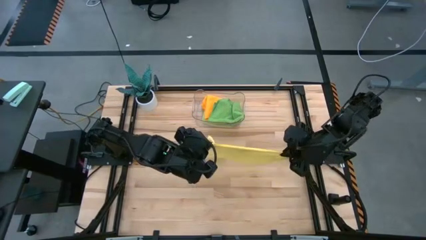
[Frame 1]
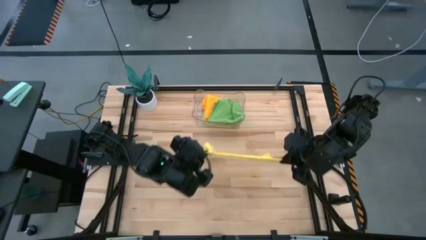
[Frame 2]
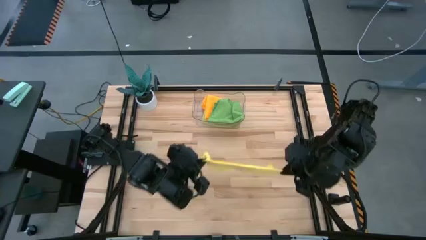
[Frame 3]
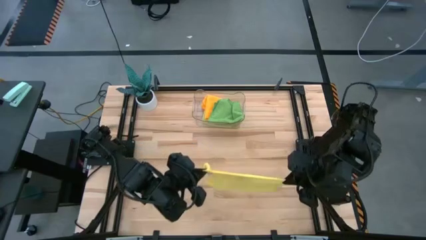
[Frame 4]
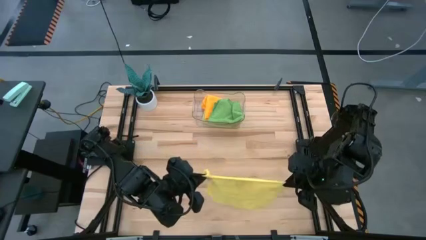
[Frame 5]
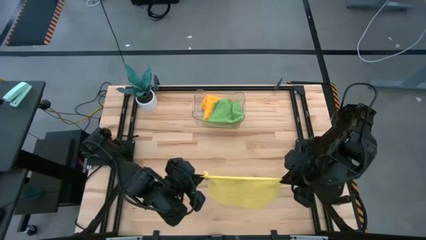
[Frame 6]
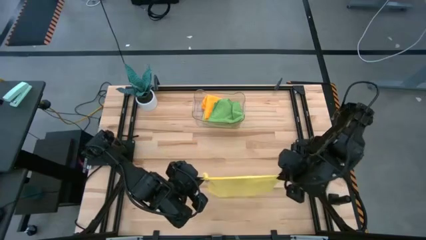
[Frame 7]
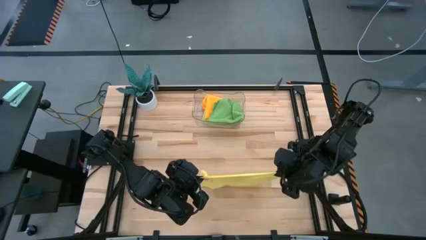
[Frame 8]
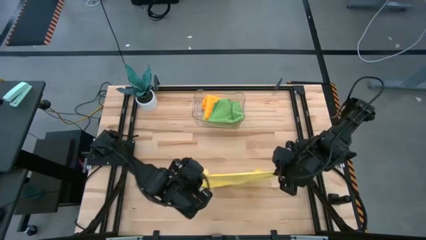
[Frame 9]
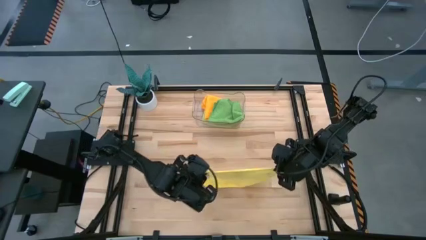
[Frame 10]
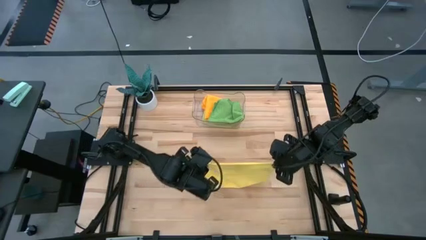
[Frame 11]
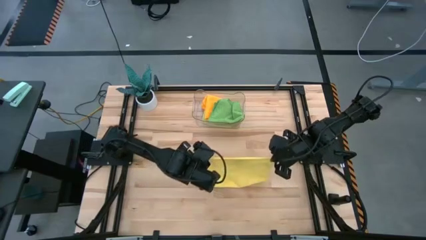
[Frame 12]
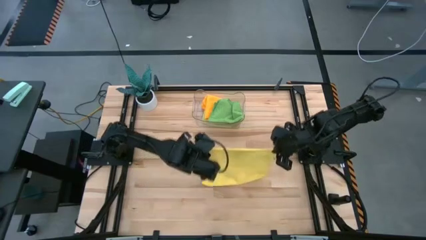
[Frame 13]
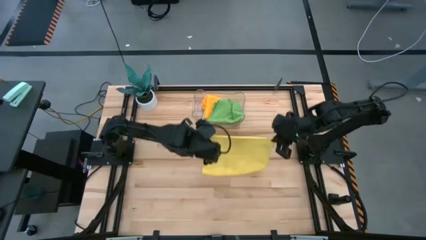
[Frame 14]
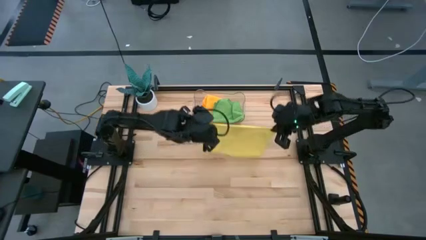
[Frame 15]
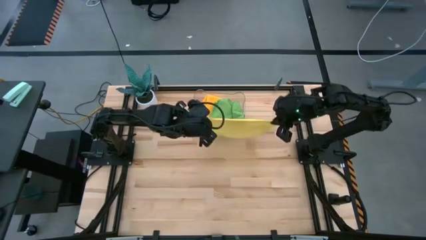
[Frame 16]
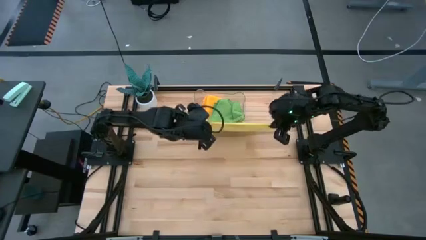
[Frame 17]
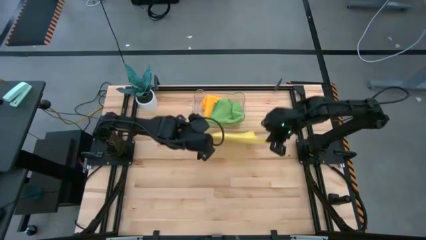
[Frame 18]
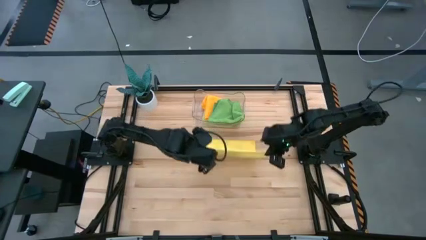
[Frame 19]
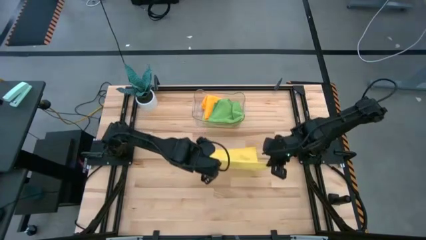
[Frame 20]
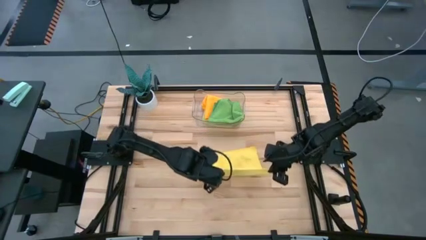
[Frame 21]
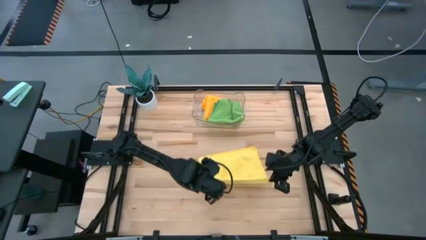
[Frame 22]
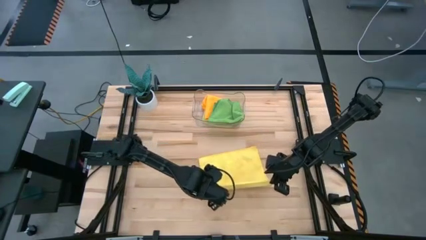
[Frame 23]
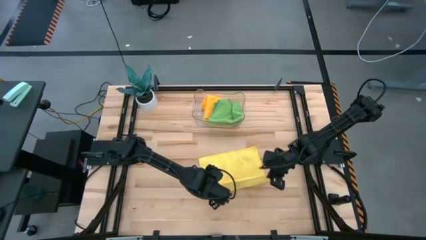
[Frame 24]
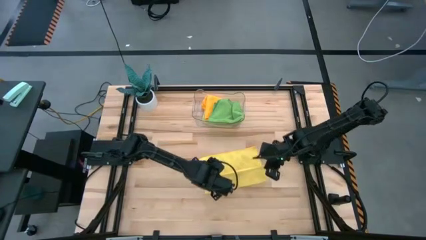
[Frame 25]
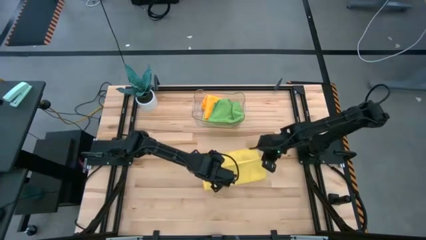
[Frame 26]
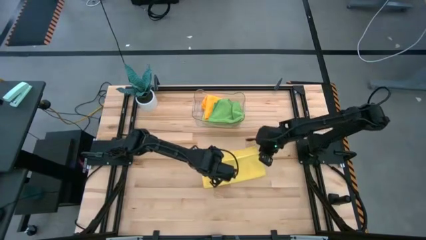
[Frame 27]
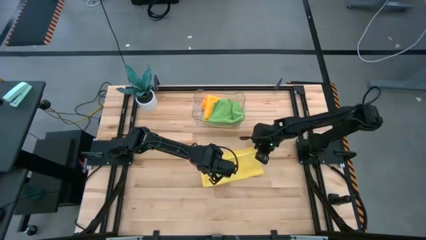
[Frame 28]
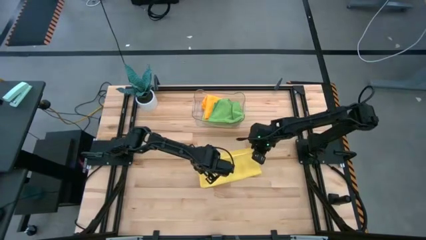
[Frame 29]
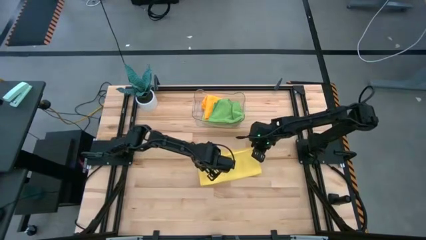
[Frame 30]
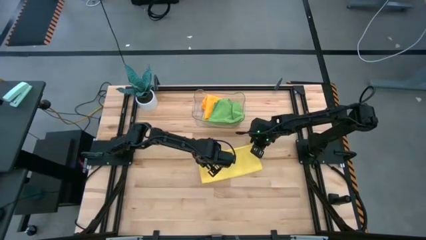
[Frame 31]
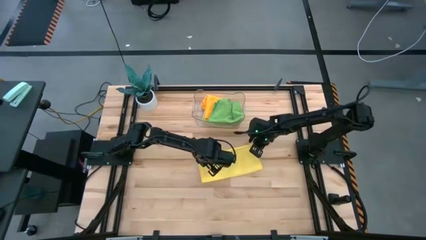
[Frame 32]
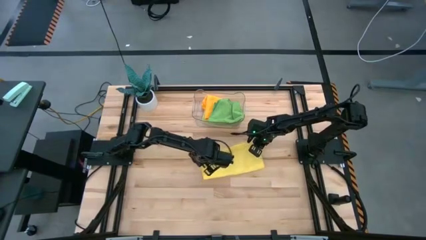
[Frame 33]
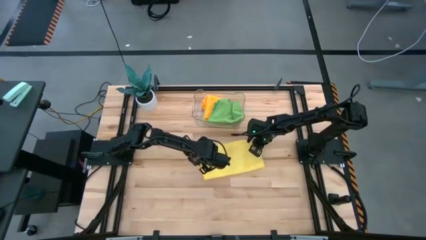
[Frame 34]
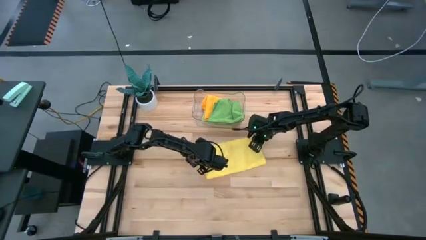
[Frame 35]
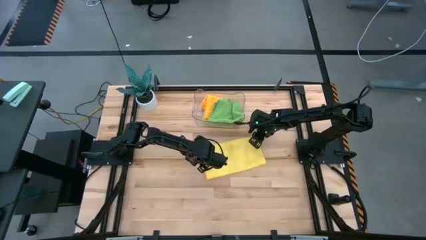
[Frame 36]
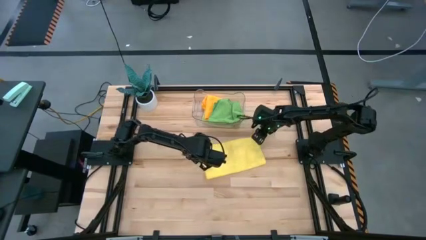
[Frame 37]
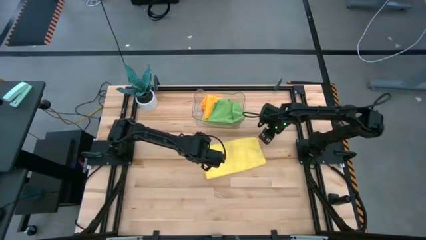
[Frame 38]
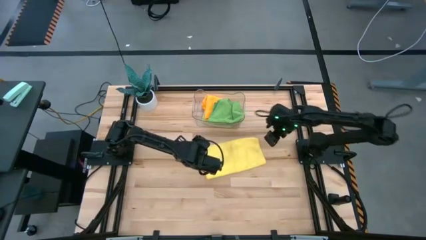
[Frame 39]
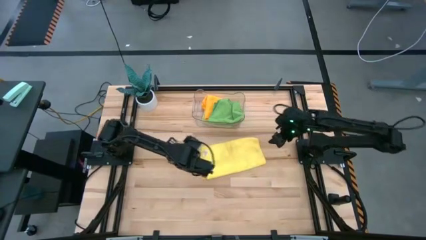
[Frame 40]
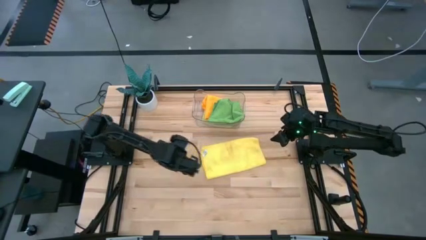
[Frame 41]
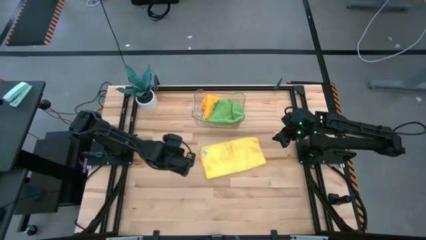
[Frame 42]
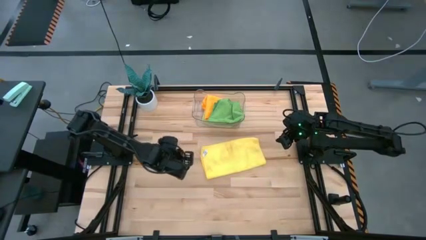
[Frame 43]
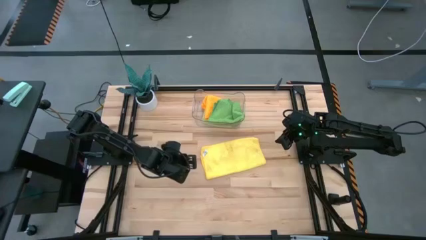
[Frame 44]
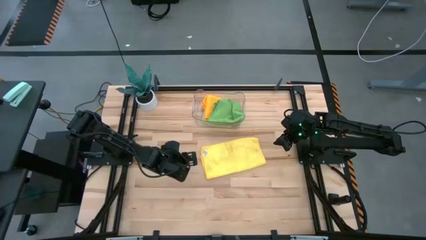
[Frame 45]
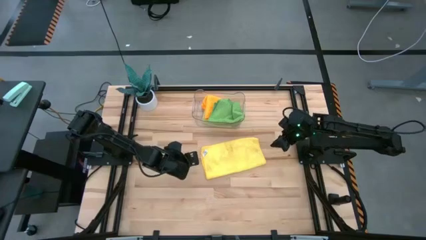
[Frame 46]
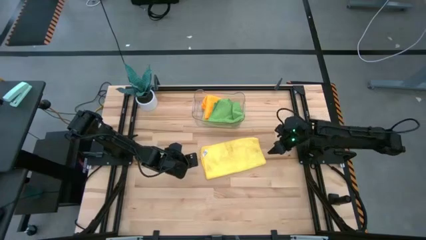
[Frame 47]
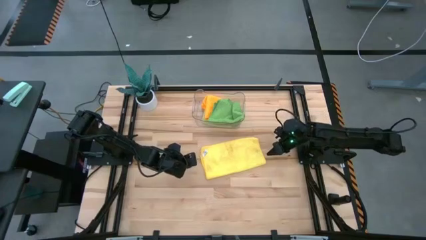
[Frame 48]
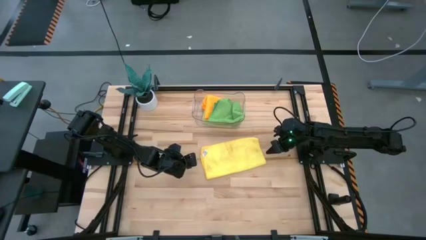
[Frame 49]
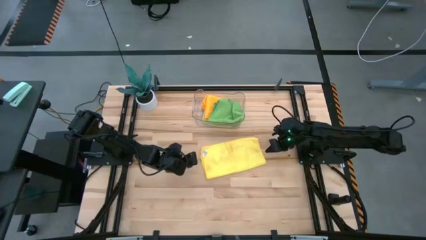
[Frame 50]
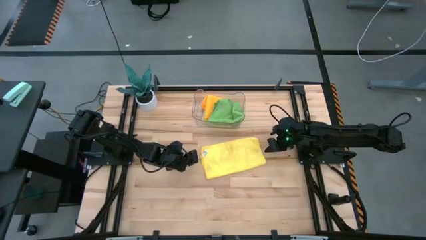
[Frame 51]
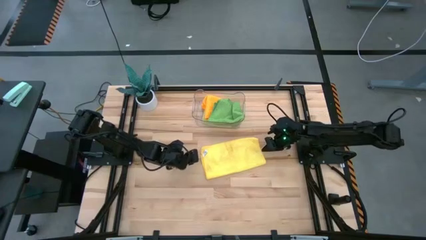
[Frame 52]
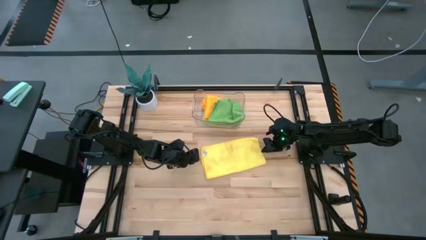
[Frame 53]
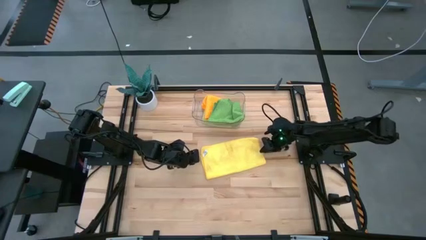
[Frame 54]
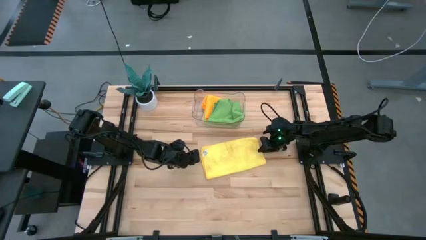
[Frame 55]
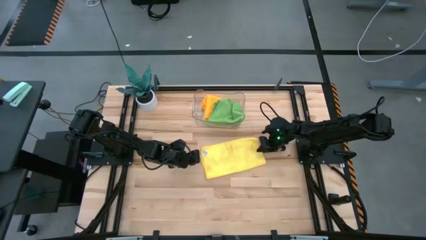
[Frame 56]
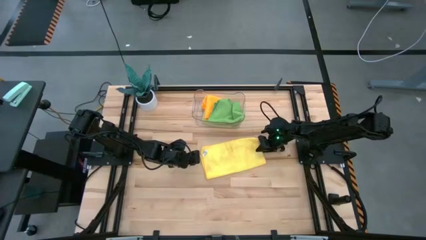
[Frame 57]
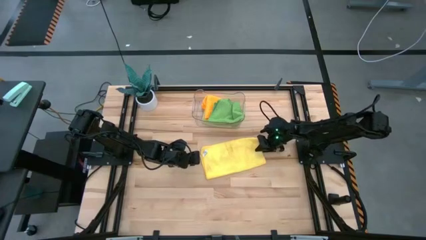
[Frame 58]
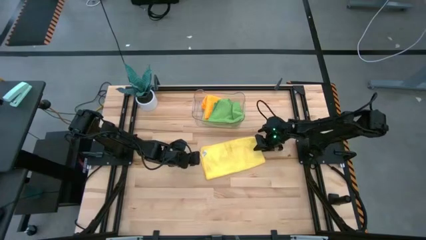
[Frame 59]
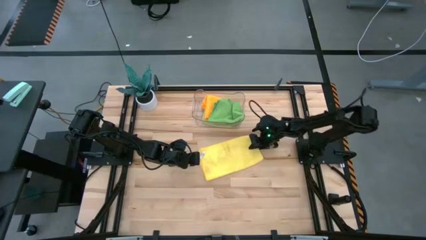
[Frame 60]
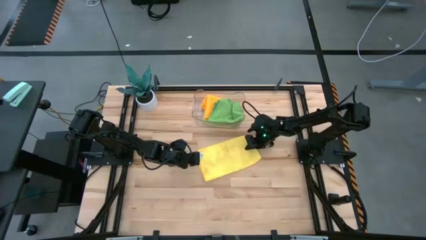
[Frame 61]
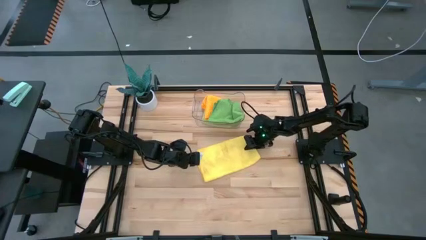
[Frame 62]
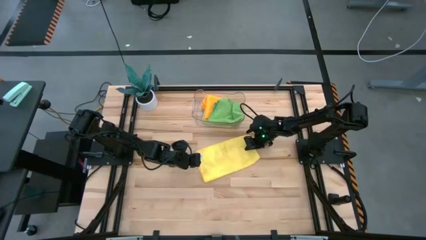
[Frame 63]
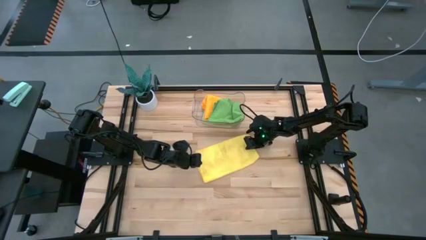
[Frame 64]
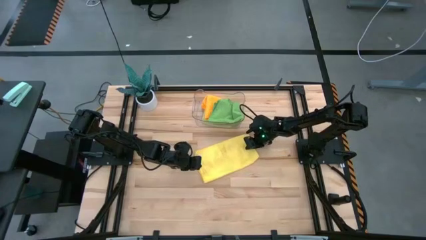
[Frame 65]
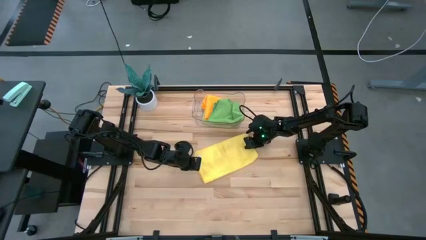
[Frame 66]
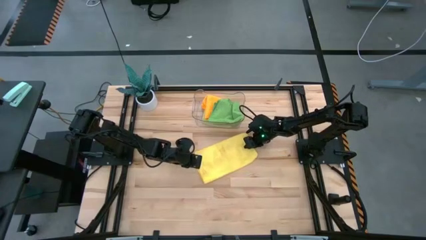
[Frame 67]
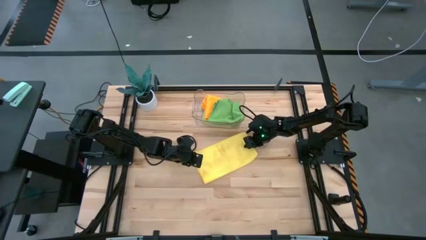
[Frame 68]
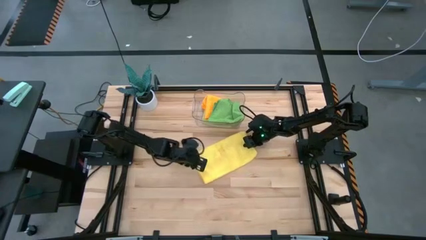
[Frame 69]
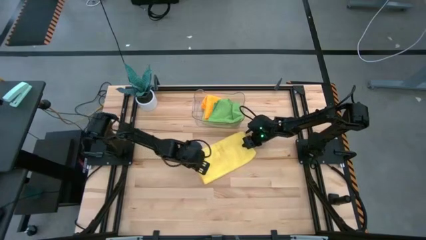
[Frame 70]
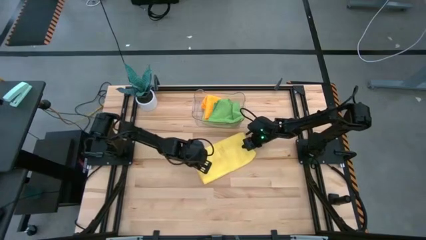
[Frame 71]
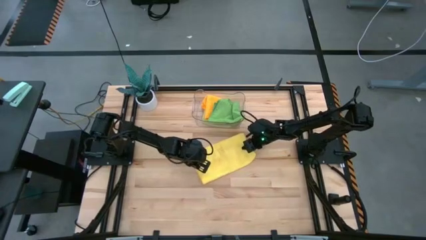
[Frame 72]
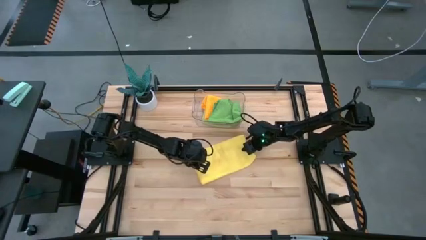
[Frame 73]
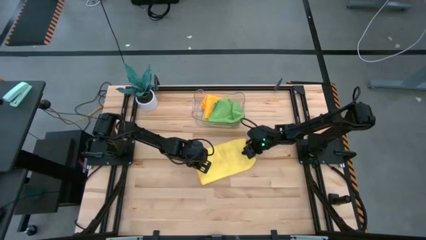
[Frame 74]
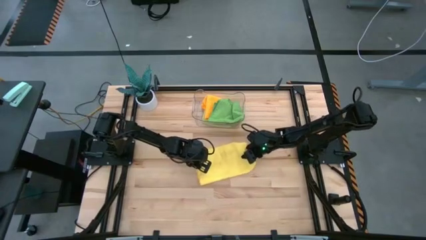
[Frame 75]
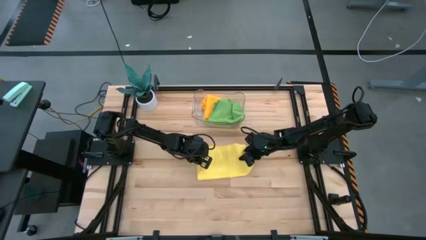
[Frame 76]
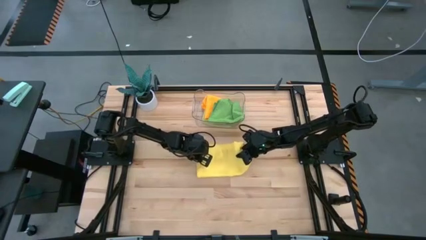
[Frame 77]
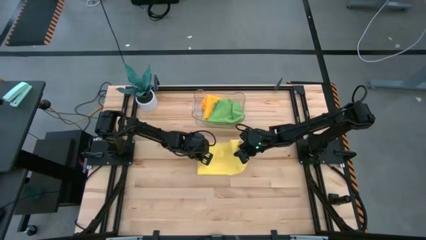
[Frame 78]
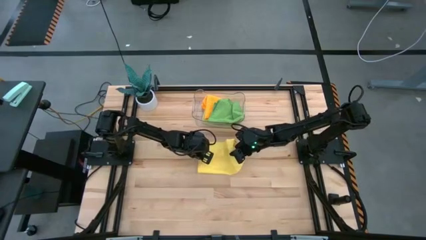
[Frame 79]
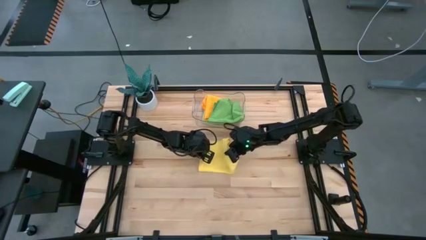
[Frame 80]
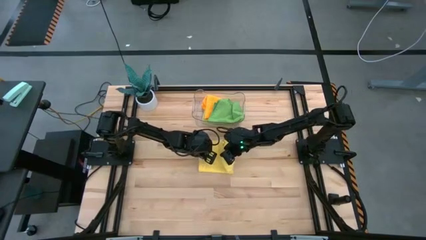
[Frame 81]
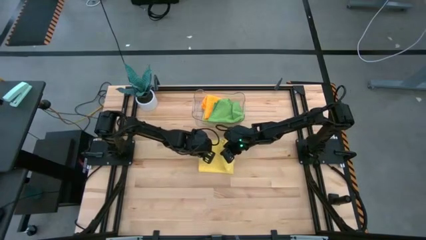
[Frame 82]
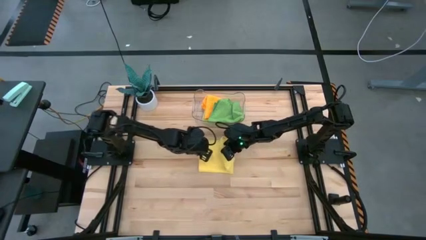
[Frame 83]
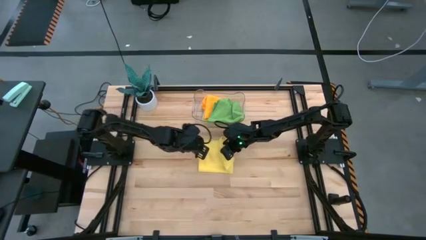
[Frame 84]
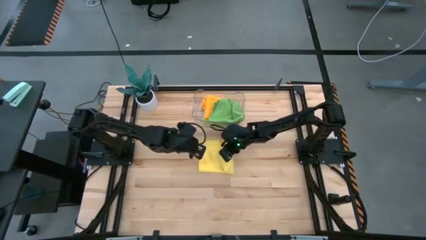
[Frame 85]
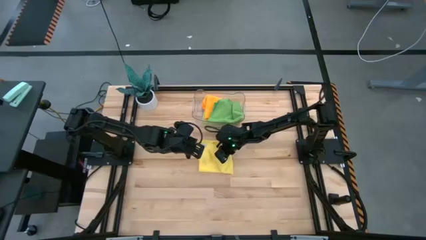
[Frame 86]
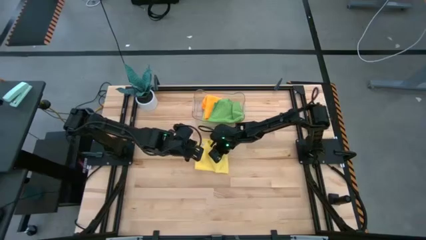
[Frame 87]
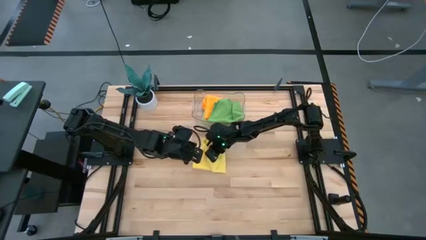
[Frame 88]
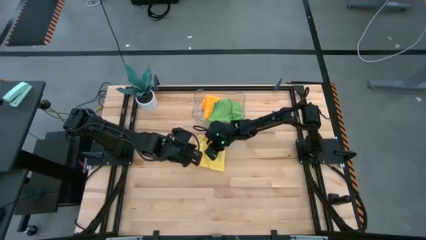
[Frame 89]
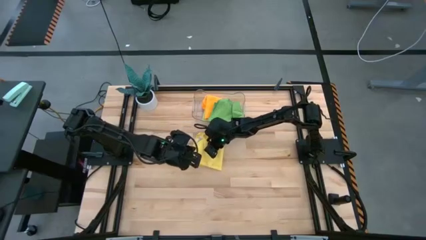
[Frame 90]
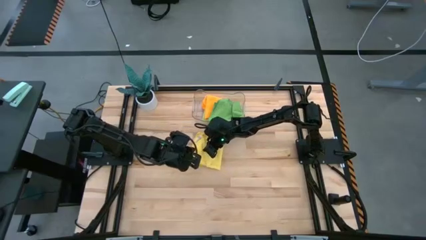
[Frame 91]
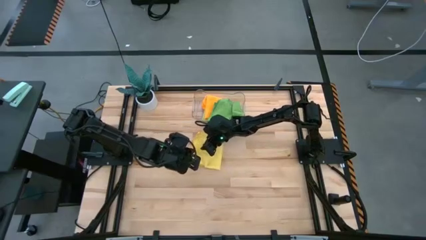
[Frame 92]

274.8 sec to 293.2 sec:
Task: Fold microfiber towels
Fold the yellow microfiber cloth
